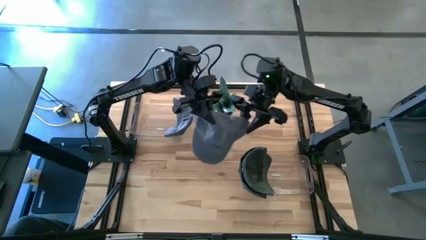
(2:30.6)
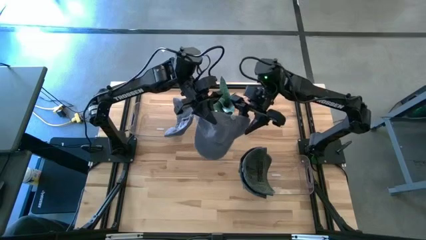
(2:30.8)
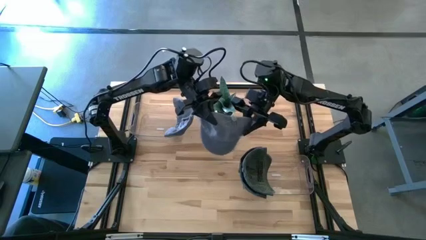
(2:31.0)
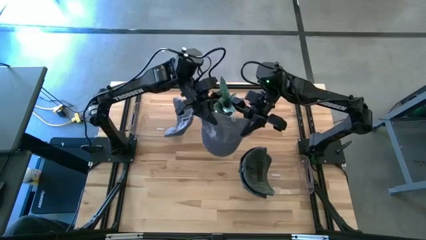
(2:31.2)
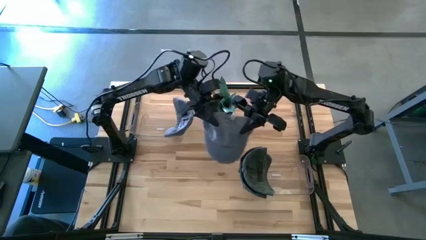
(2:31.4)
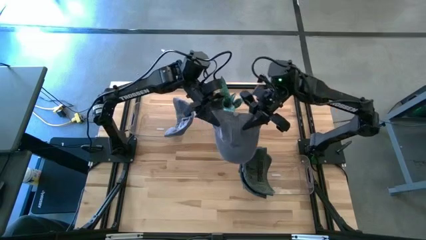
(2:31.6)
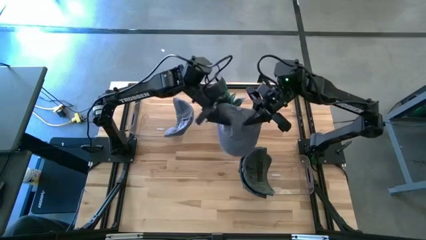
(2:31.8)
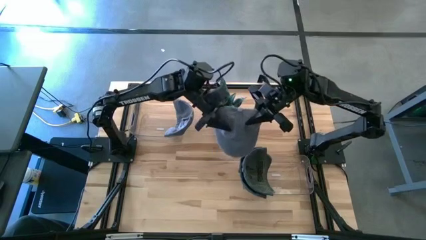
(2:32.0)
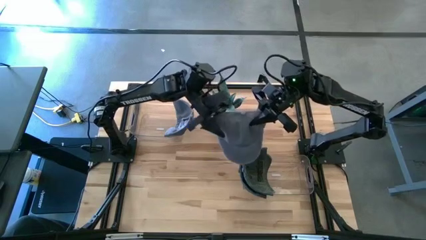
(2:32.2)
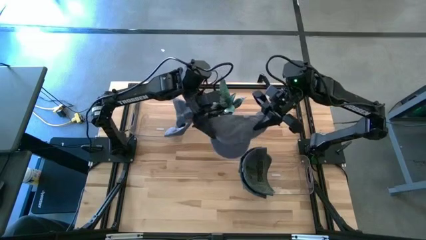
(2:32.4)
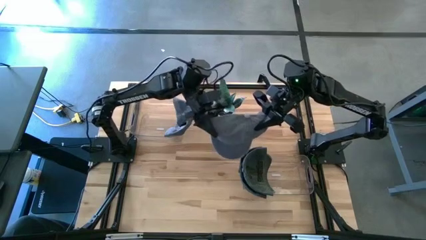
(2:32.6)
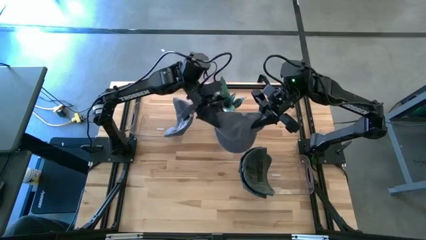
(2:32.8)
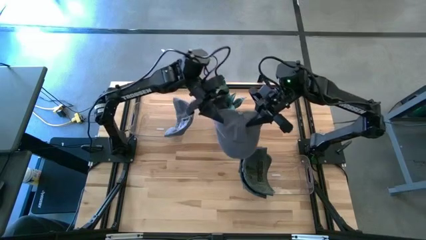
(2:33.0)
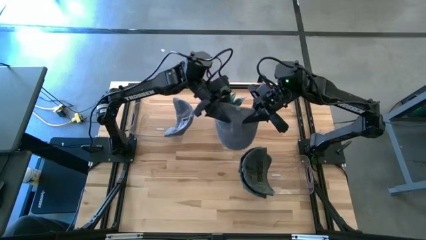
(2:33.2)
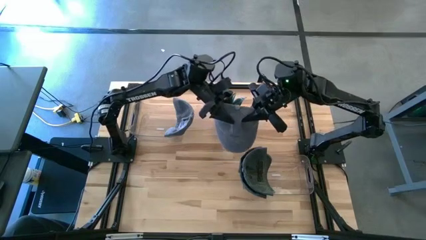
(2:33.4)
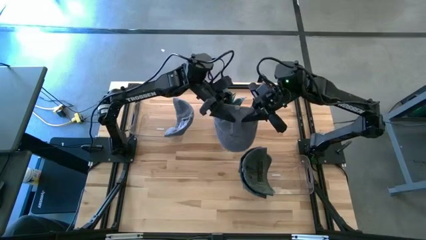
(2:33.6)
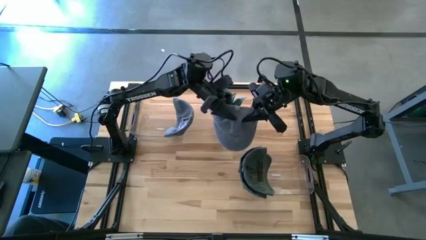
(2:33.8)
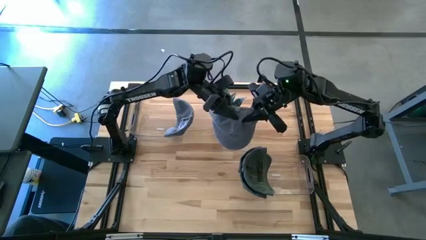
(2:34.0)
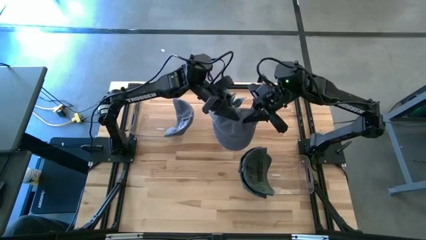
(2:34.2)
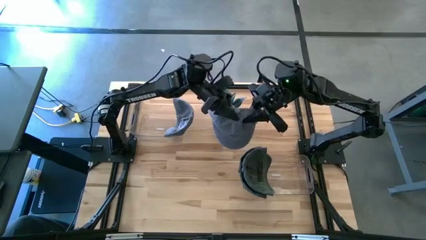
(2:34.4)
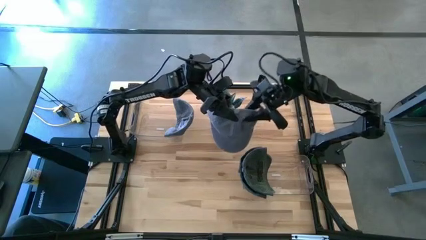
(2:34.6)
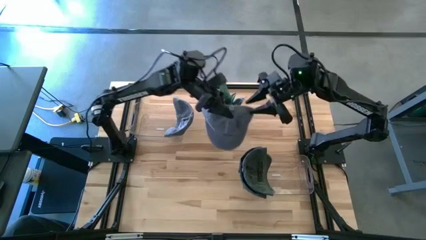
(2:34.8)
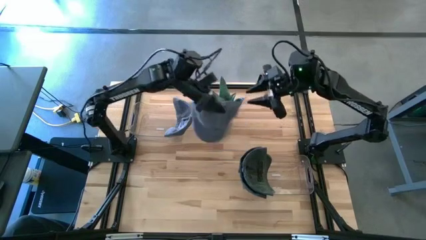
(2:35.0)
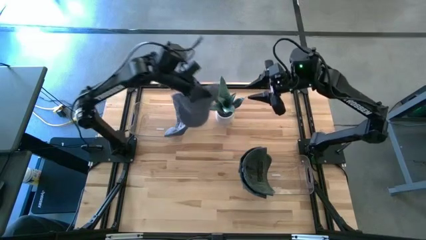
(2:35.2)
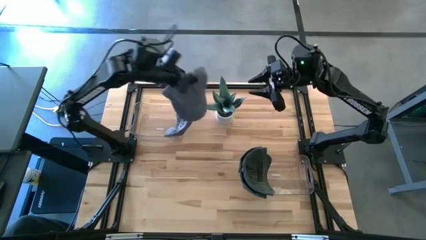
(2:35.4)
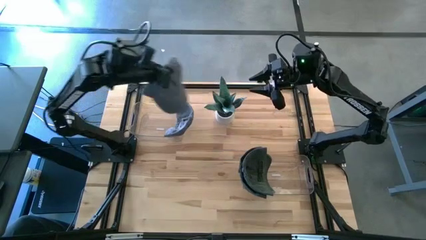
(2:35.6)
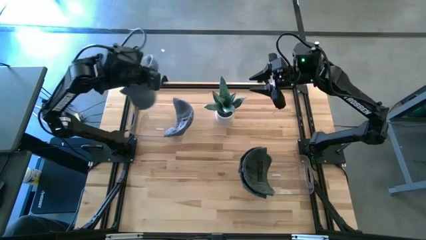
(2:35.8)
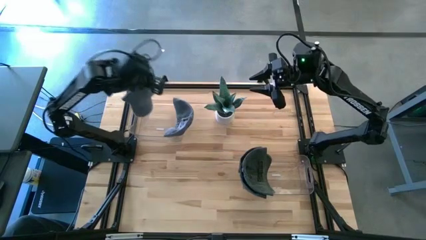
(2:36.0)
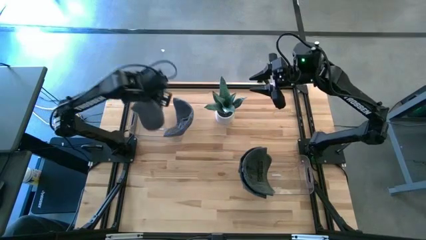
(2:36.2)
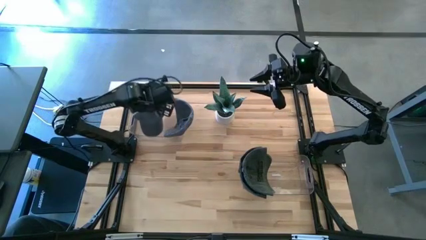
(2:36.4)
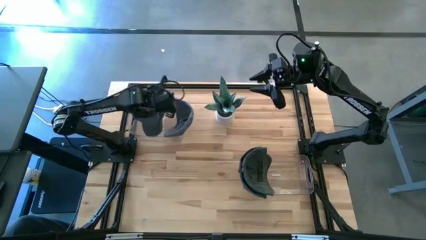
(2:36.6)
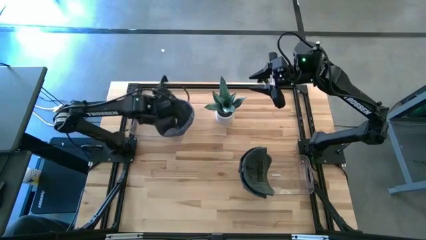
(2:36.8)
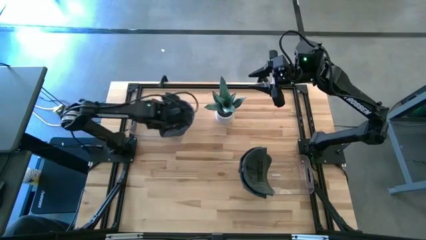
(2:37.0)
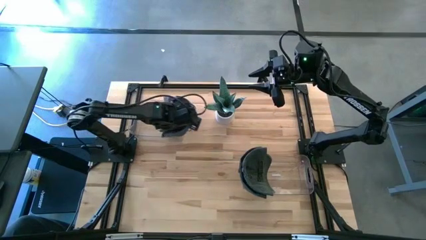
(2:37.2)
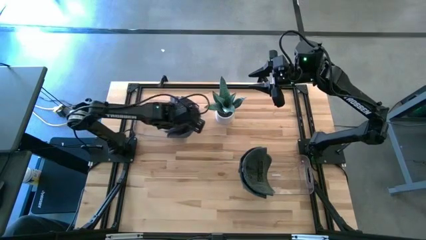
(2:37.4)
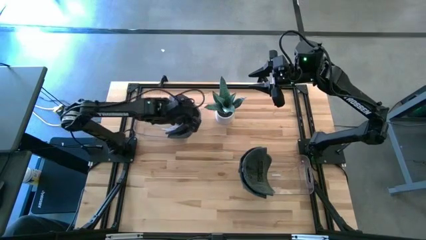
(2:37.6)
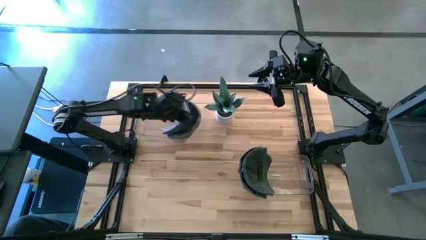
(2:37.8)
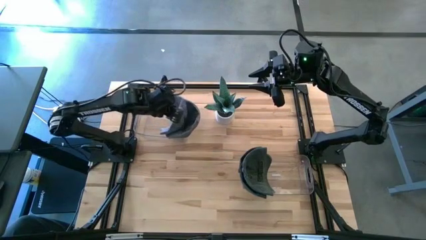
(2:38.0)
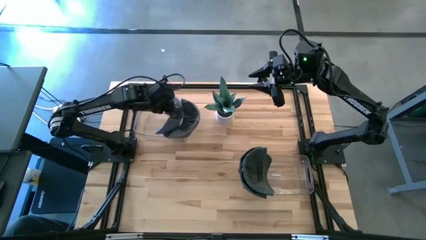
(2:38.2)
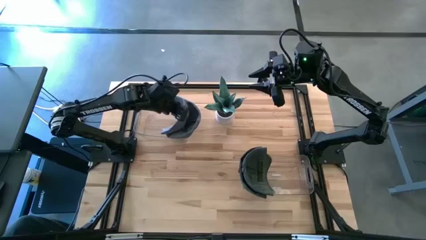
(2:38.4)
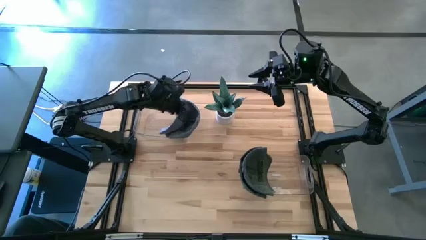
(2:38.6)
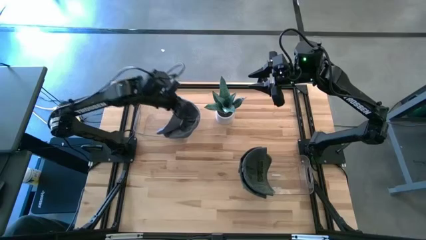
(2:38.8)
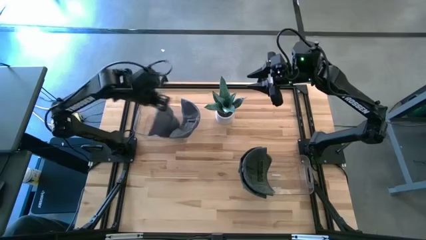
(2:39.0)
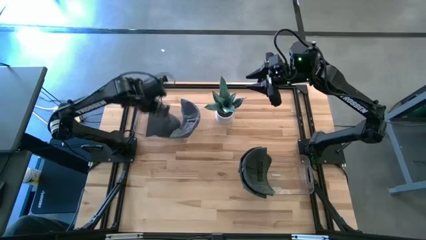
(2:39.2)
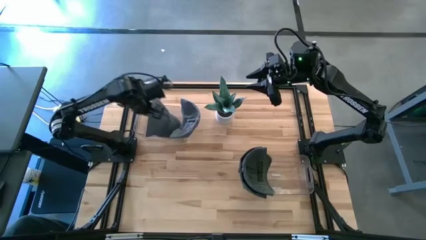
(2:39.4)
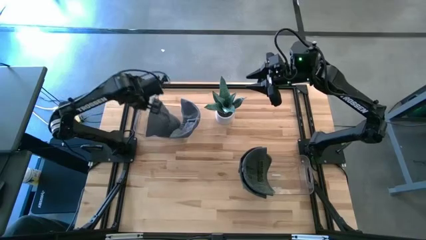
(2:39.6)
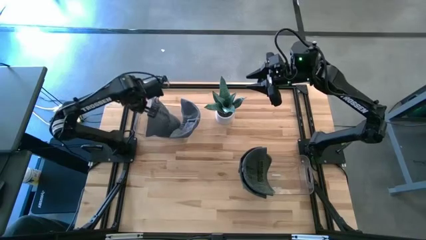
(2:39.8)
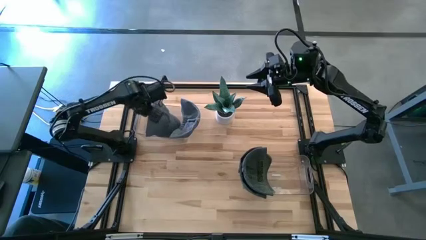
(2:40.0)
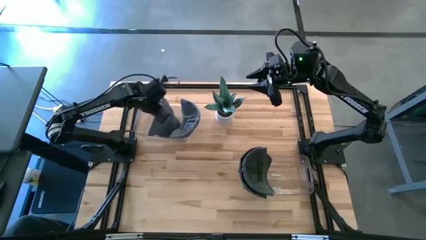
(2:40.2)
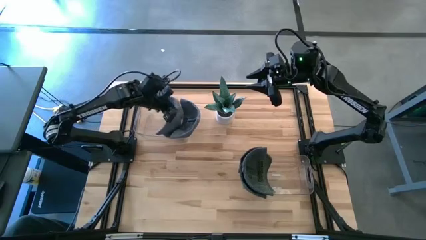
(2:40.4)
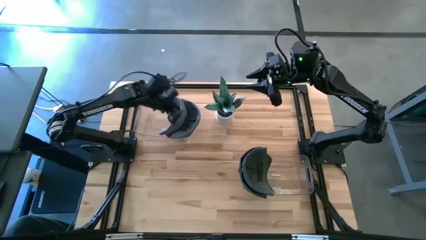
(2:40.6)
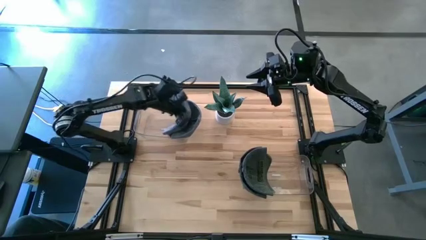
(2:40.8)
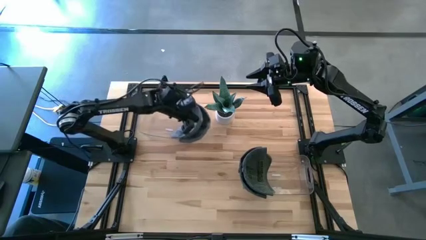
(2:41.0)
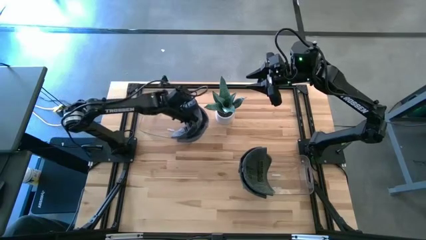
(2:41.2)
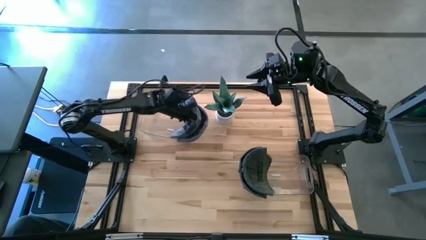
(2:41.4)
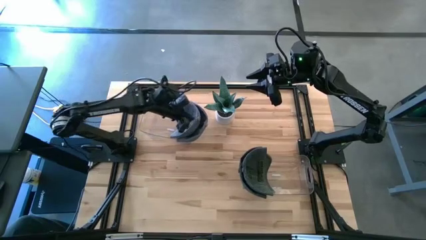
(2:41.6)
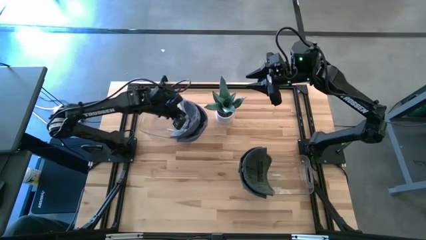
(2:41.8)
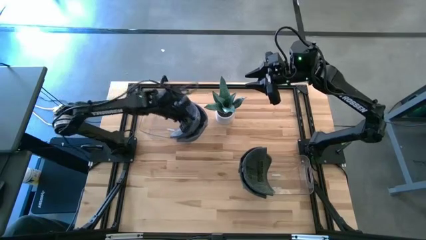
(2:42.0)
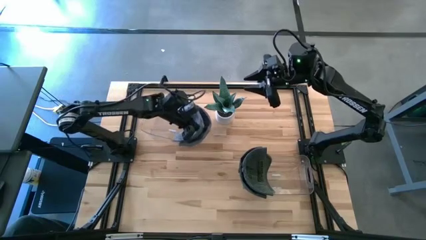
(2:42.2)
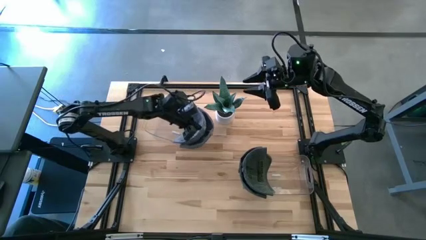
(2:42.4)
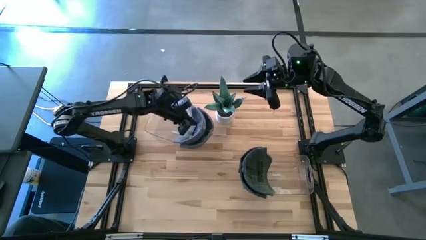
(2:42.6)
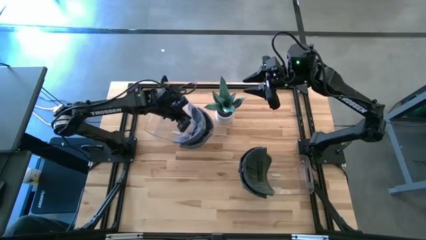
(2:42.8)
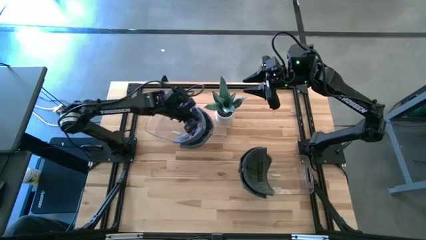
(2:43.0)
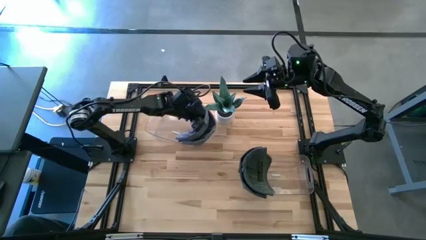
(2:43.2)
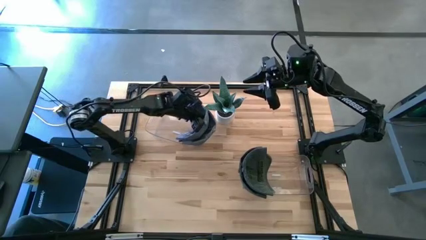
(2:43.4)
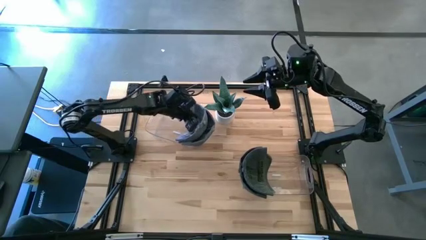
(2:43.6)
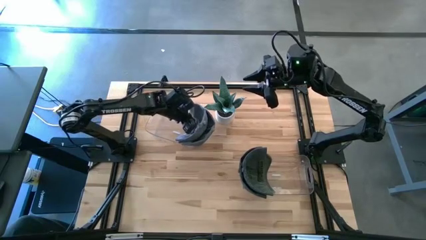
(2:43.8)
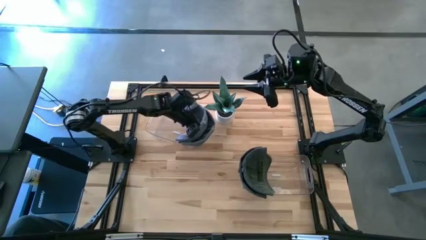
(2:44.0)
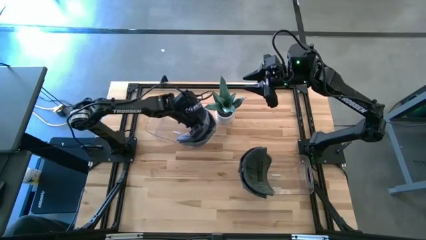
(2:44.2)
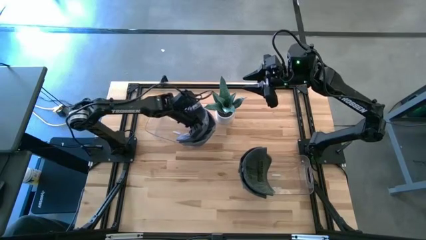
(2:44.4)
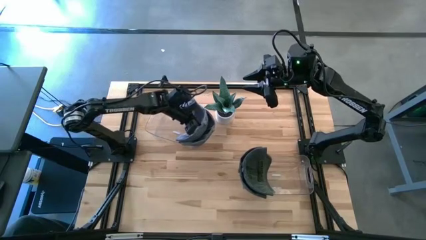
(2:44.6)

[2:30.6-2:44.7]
Task: Pick & Place hat
Put the gray cap into the left transparent bin
